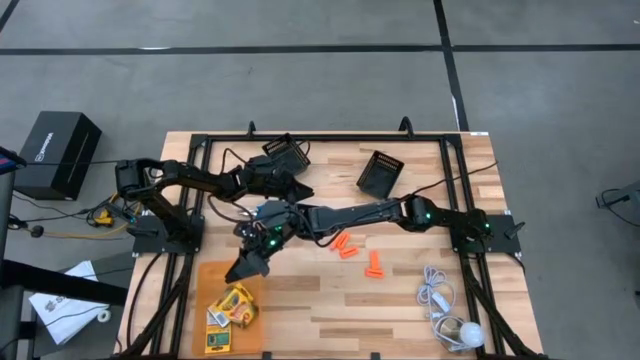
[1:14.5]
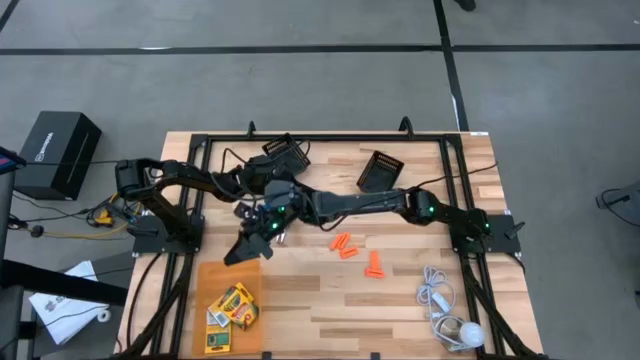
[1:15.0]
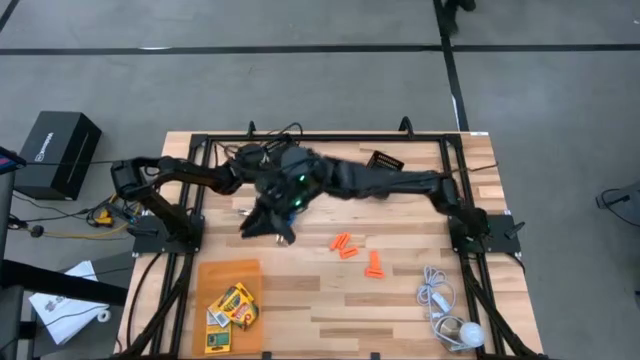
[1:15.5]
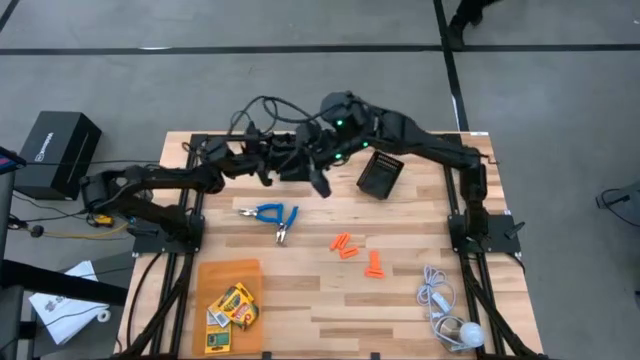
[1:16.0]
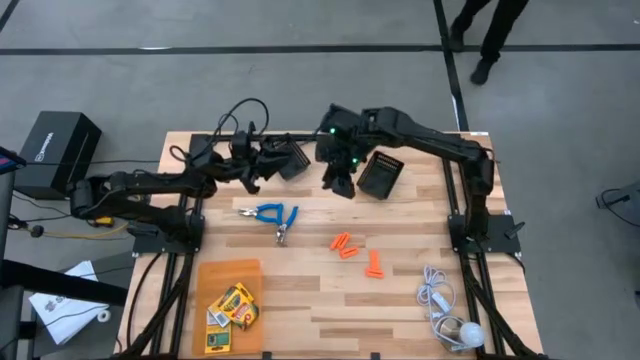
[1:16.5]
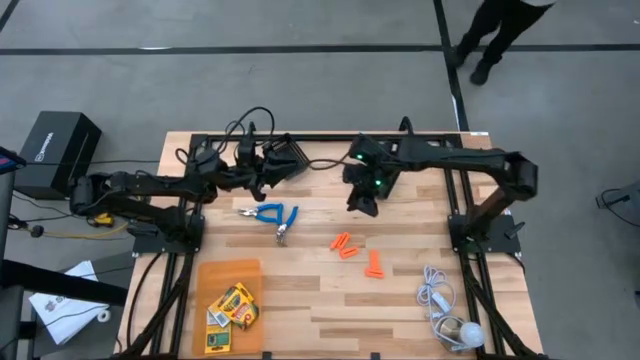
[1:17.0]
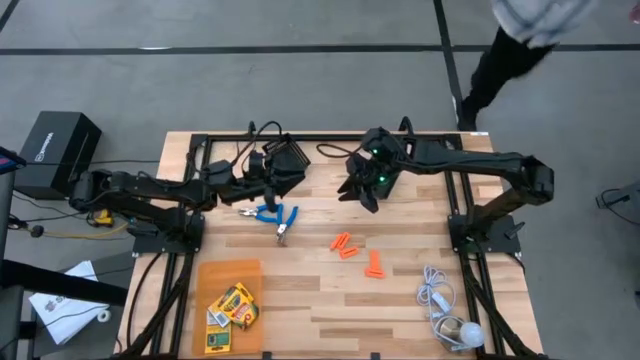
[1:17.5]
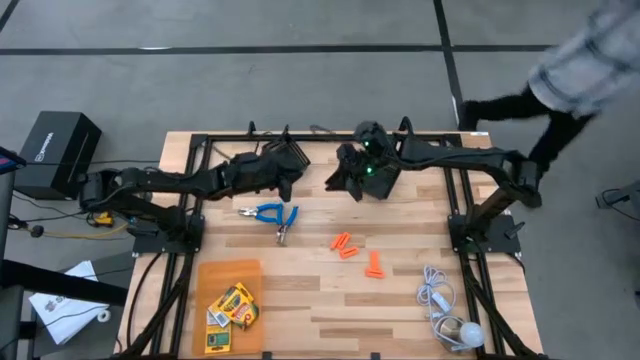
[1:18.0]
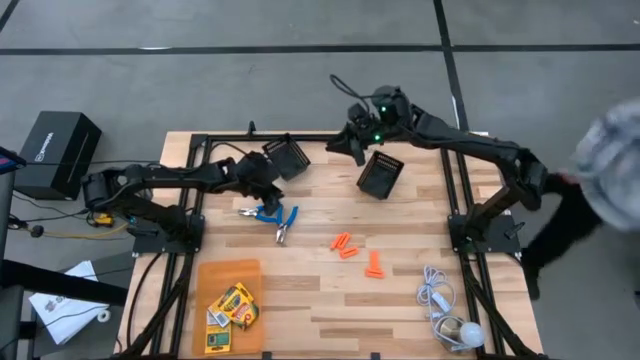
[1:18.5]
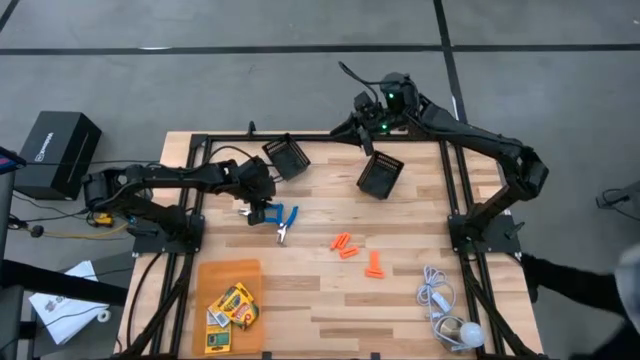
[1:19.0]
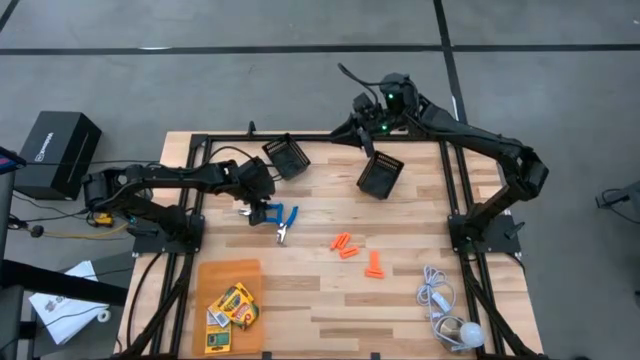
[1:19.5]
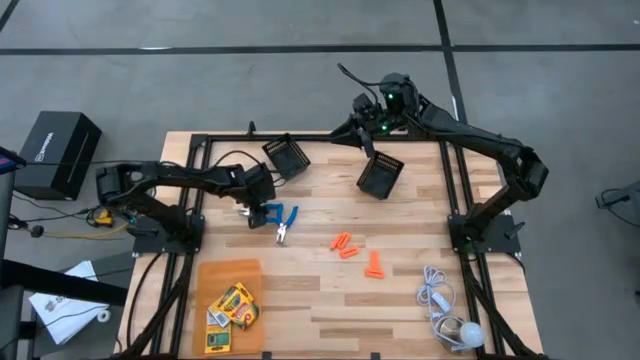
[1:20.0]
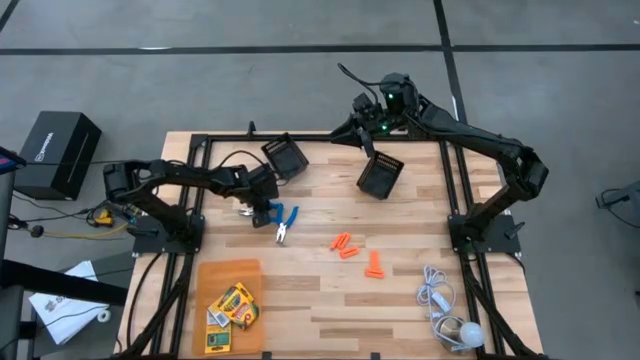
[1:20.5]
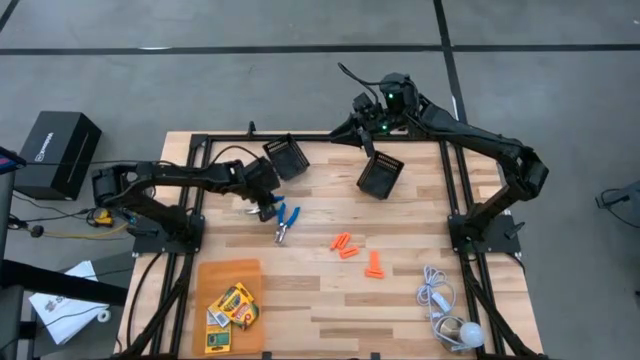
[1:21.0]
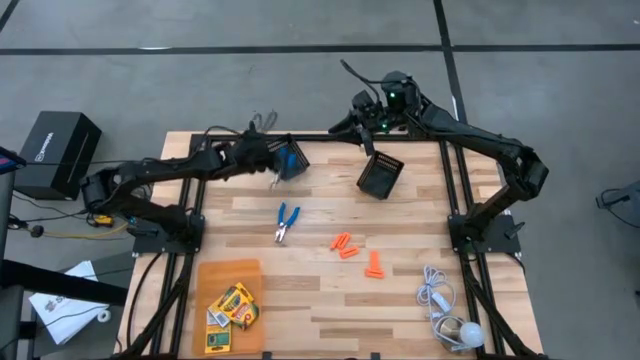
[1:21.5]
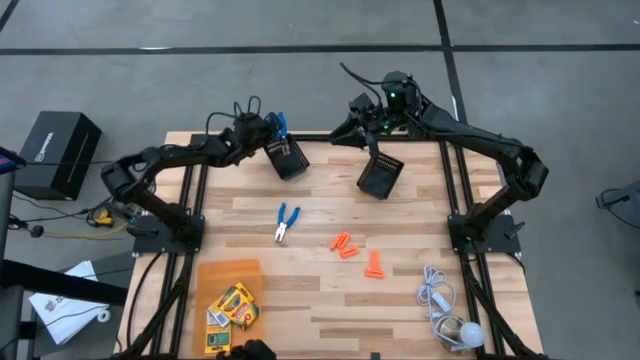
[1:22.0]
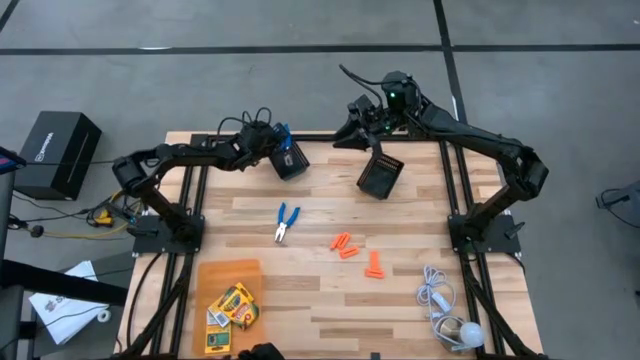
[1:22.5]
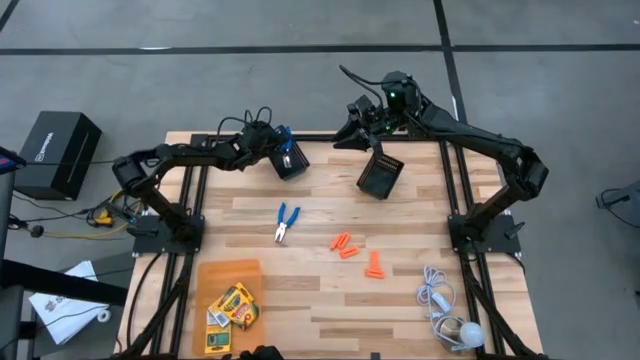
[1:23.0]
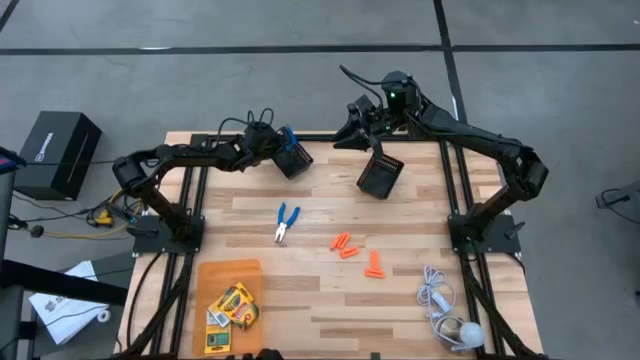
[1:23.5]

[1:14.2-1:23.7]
Task: Pick & Place School Supplies
Put the blue punch pliers into the left black bin

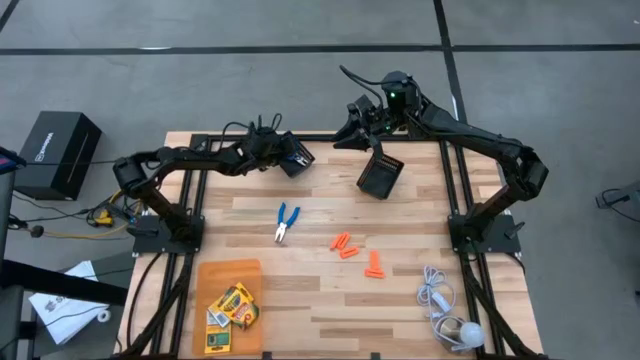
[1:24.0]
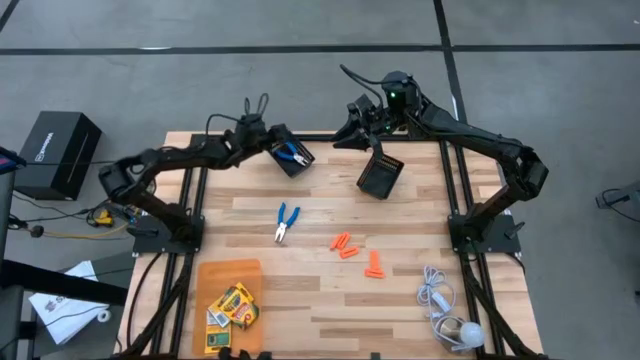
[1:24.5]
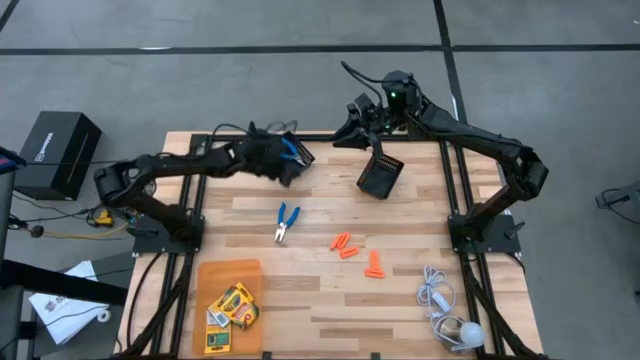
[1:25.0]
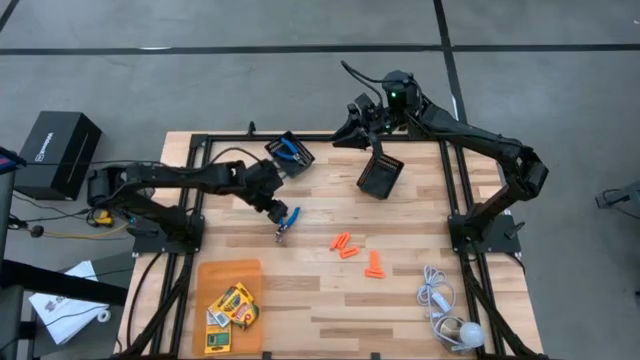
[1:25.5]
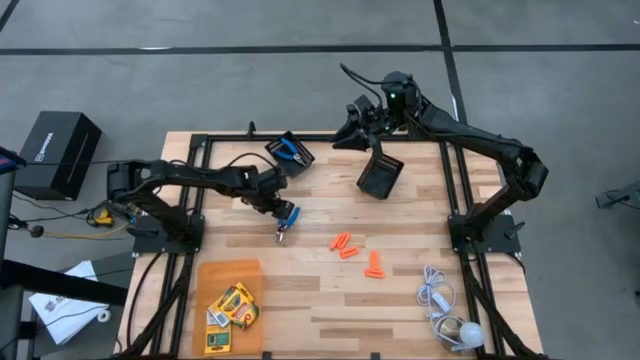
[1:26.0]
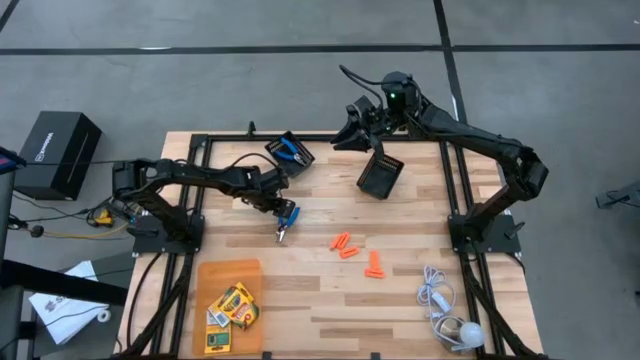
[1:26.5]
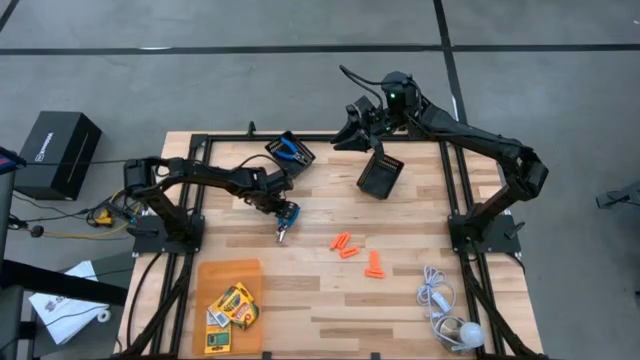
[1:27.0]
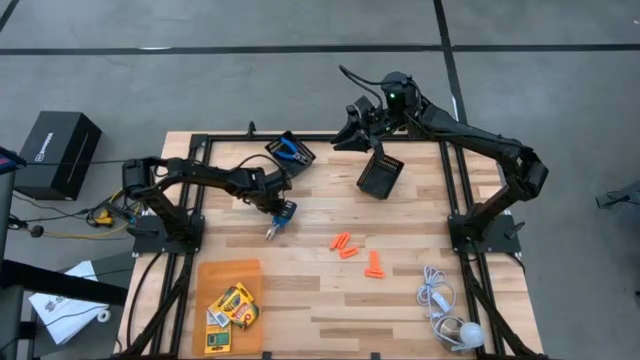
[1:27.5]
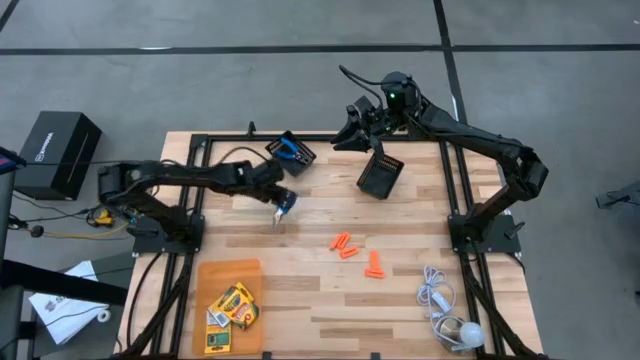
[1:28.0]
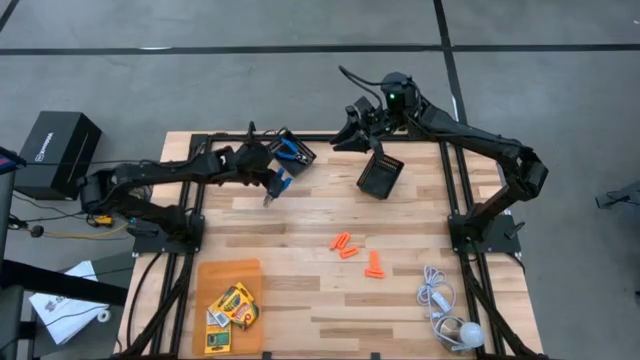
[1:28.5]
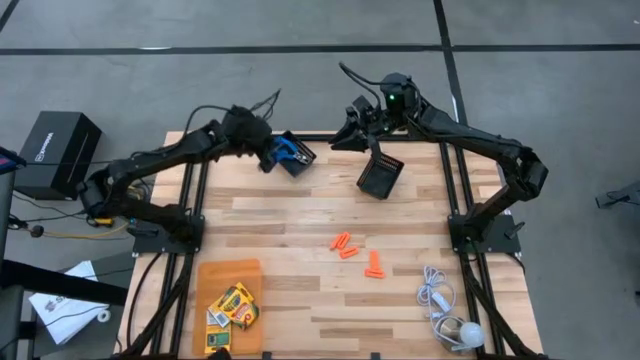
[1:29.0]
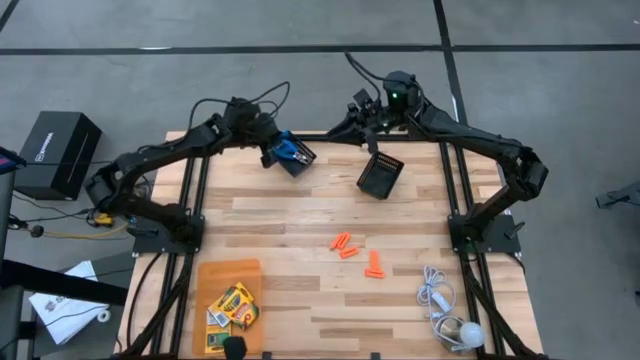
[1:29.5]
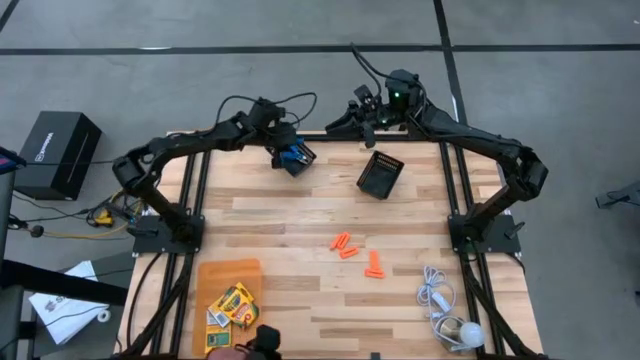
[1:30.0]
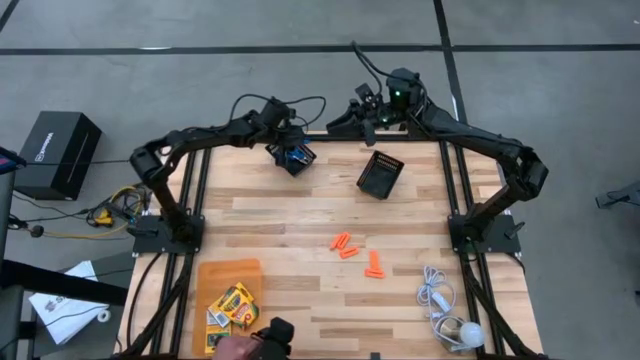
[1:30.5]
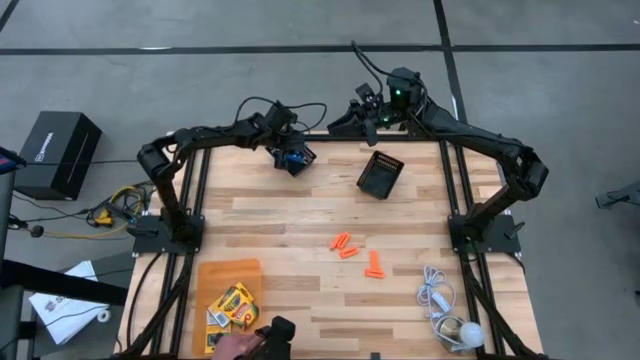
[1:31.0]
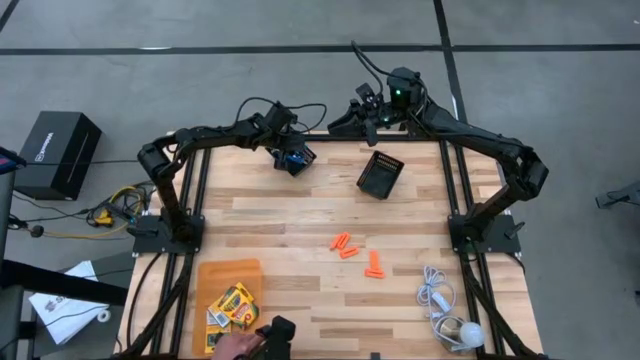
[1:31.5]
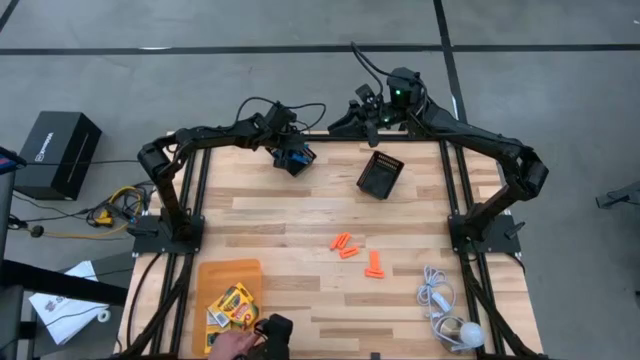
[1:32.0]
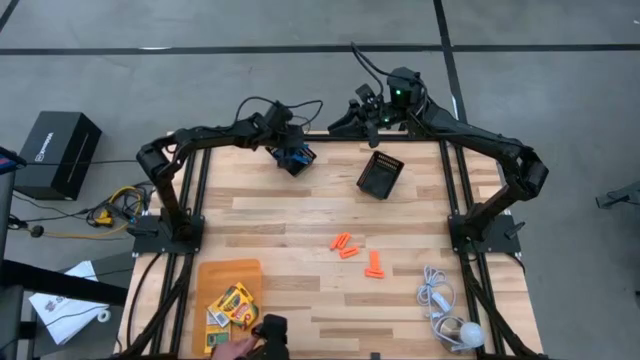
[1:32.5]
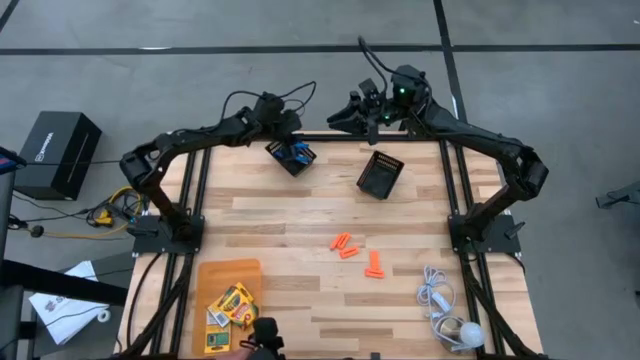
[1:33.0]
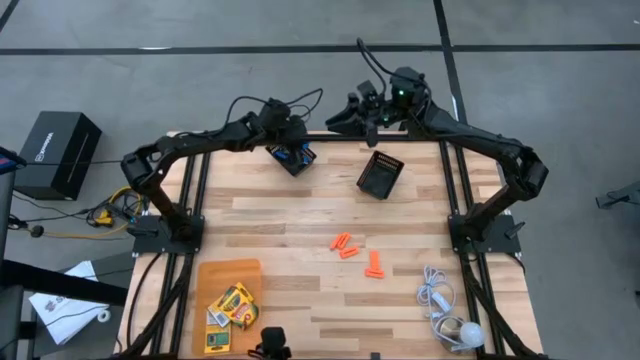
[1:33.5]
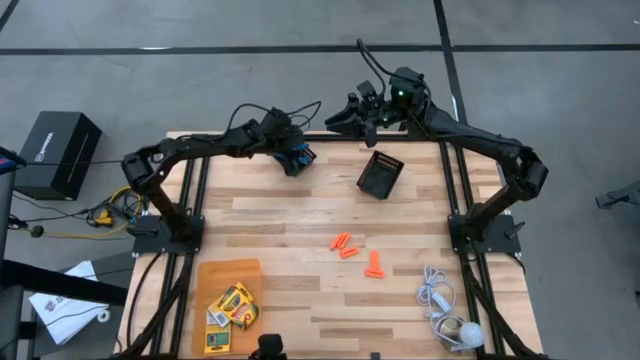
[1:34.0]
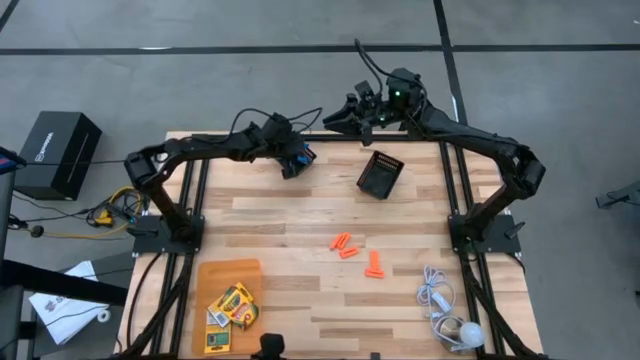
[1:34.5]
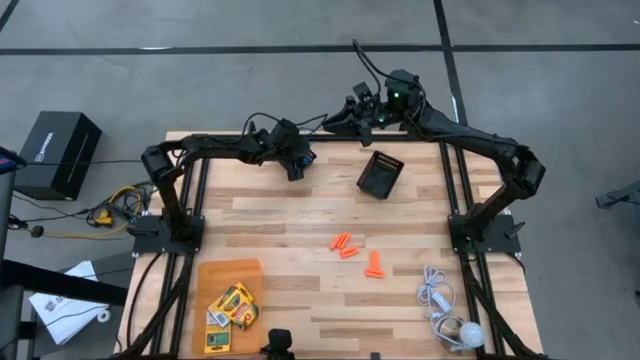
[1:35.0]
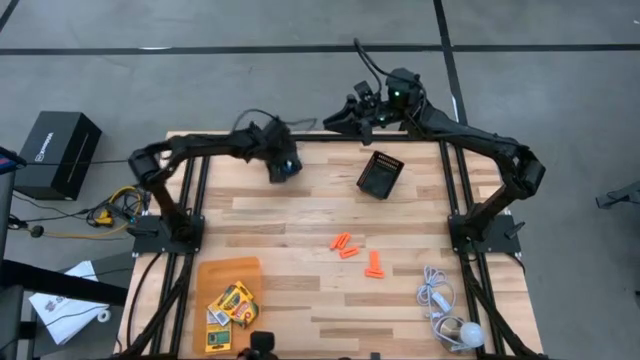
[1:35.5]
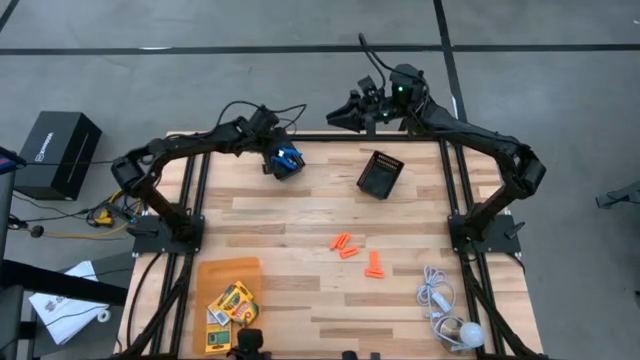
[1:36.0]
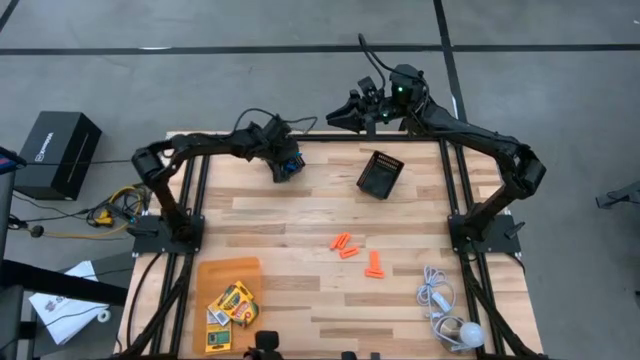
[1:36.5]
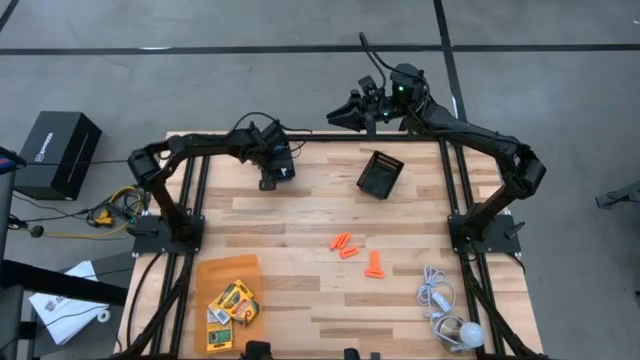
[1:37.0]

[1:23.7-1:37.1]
Put the blue punch pliers into the left black bin
